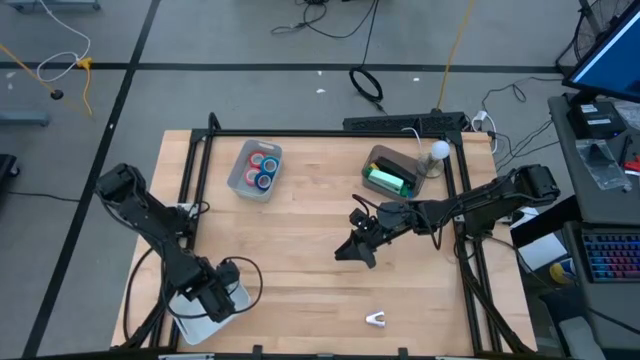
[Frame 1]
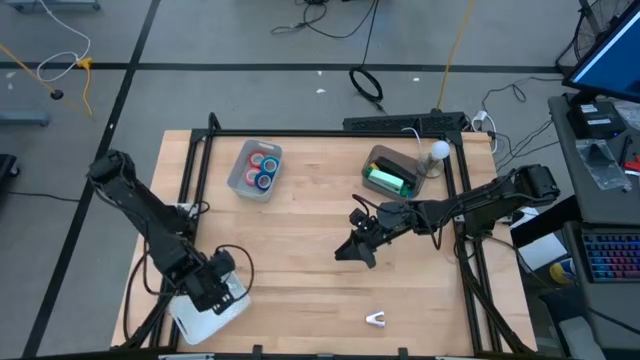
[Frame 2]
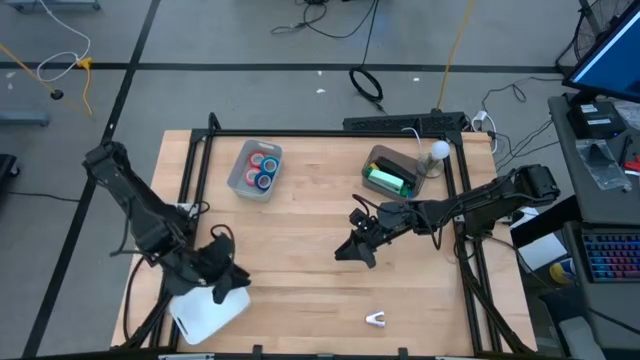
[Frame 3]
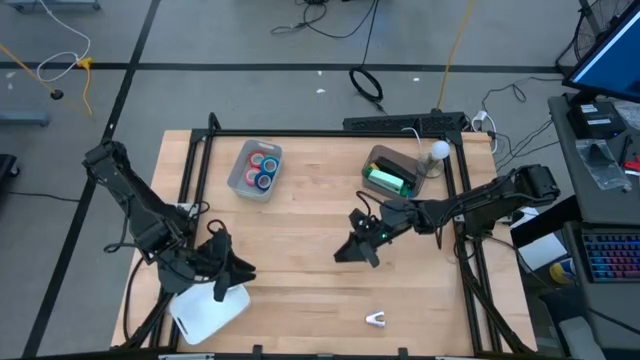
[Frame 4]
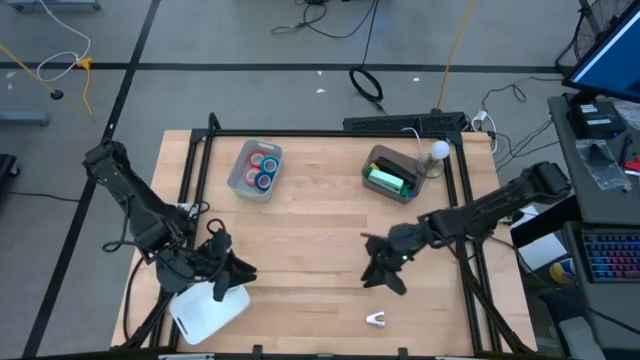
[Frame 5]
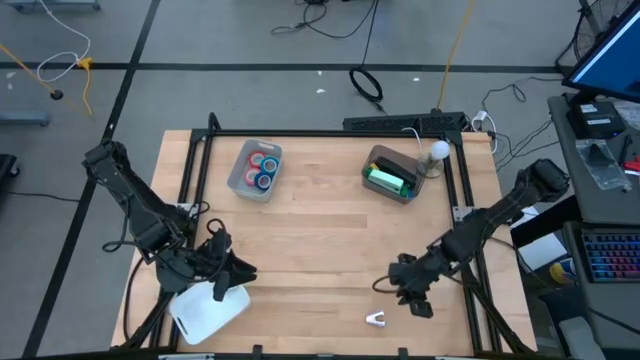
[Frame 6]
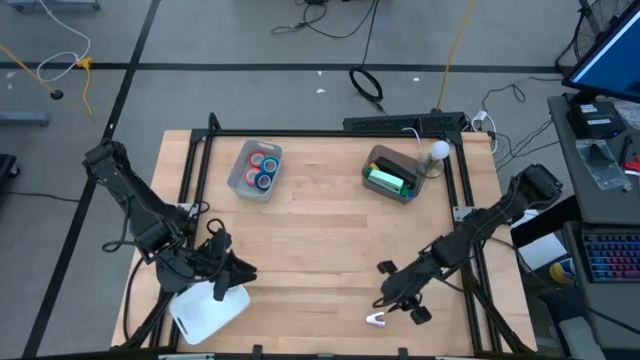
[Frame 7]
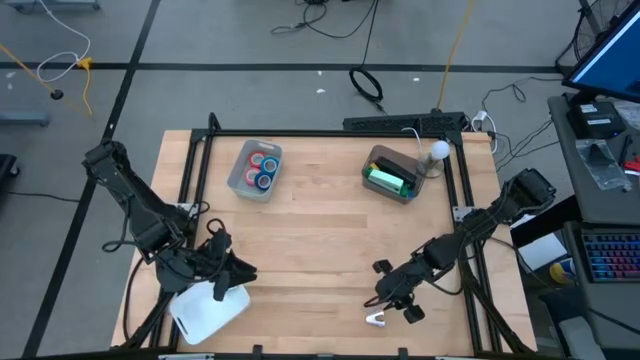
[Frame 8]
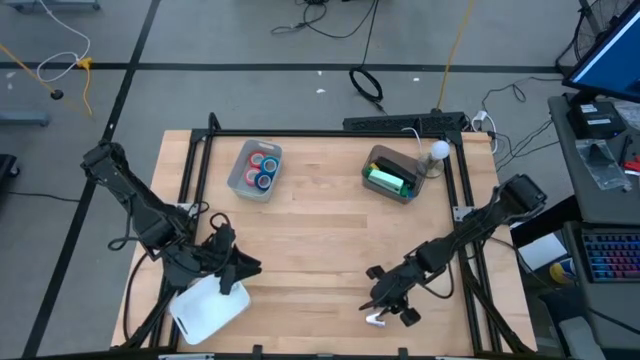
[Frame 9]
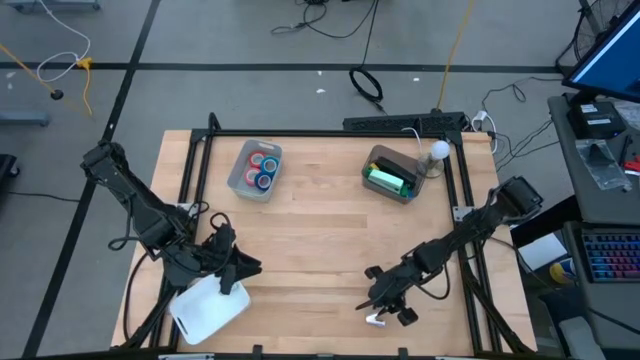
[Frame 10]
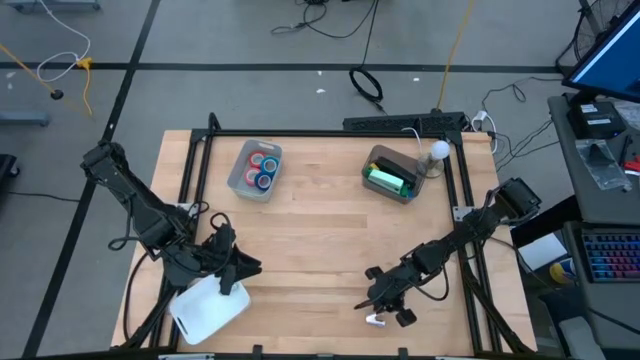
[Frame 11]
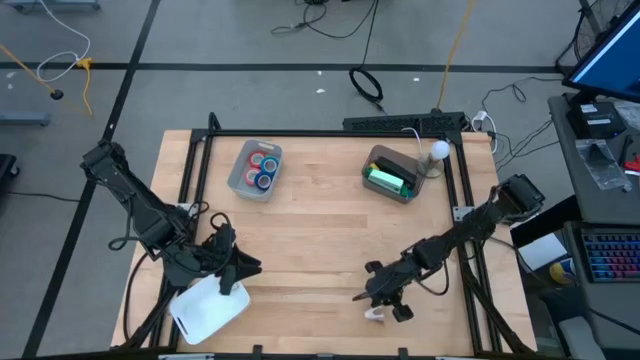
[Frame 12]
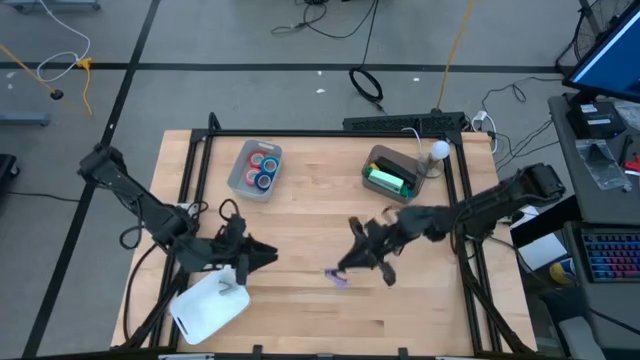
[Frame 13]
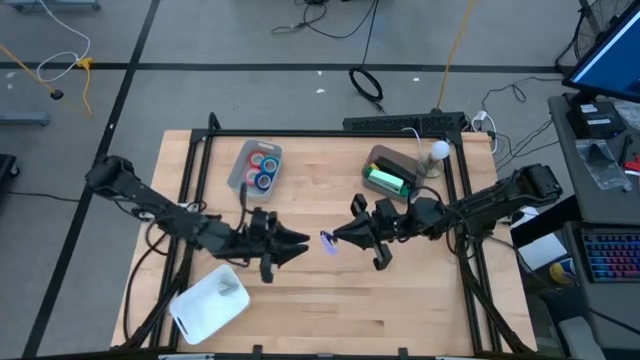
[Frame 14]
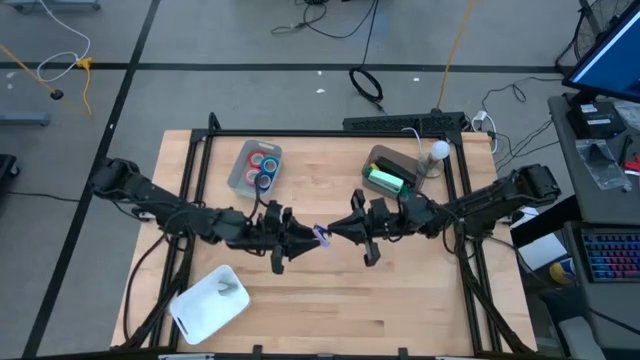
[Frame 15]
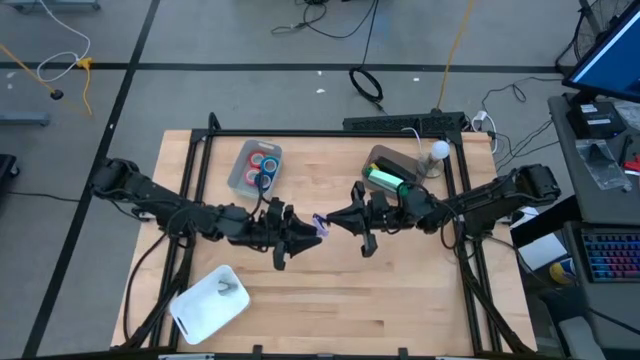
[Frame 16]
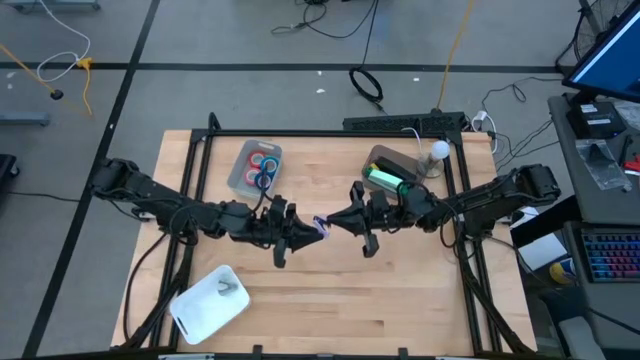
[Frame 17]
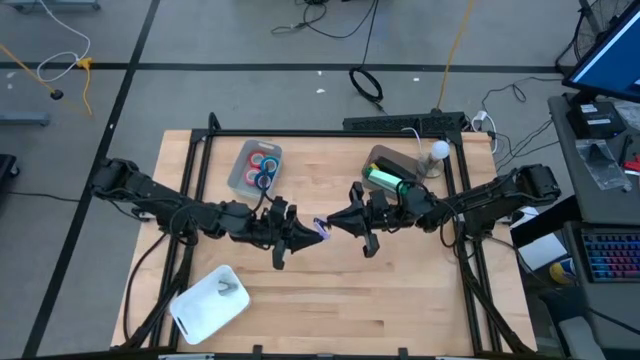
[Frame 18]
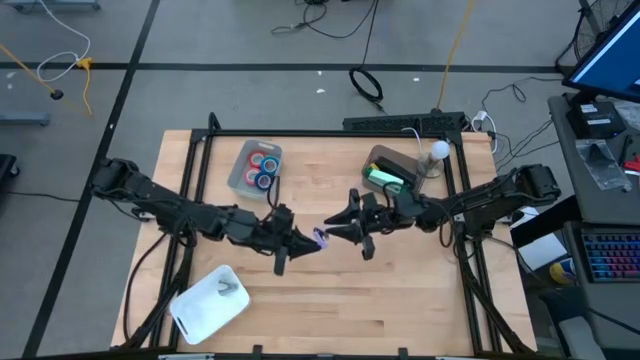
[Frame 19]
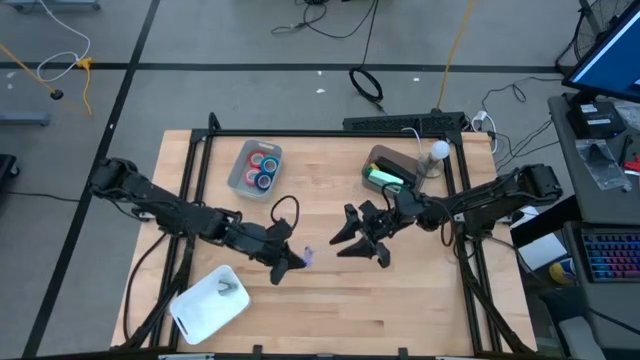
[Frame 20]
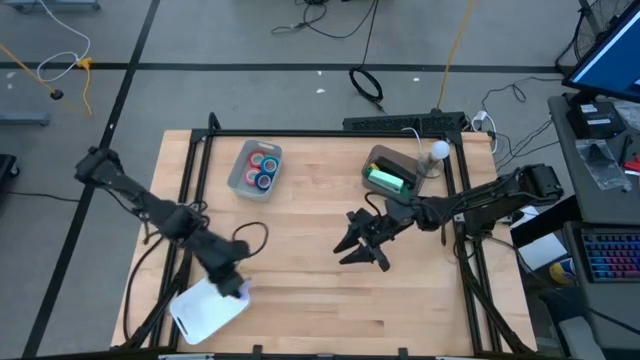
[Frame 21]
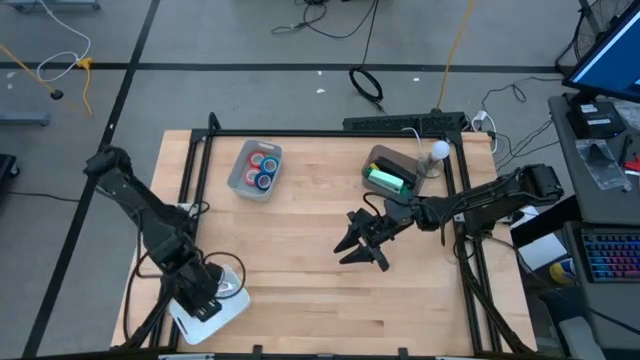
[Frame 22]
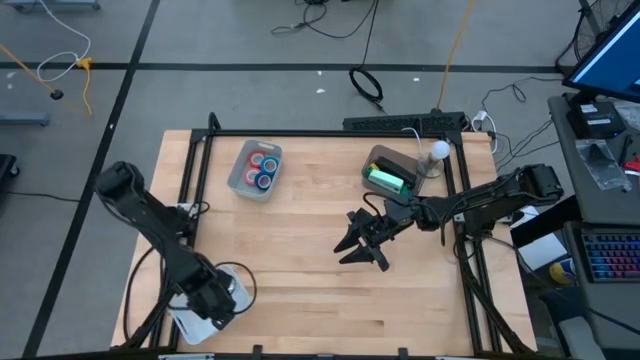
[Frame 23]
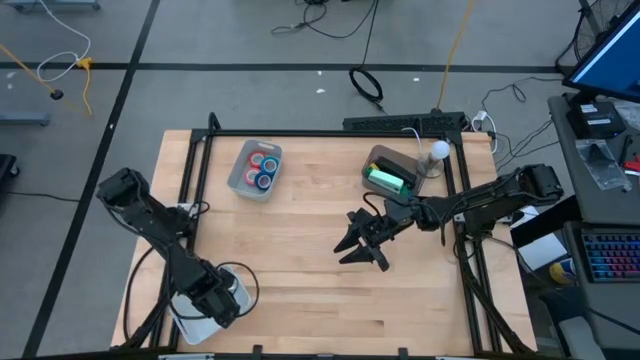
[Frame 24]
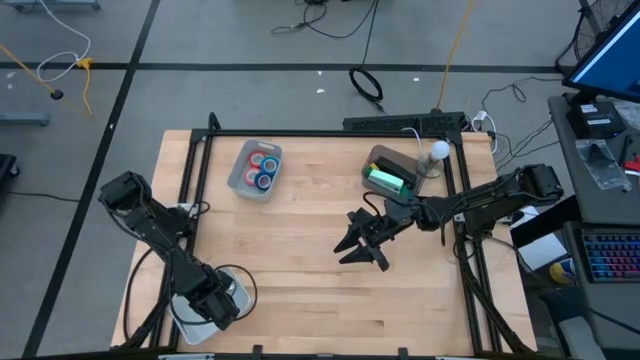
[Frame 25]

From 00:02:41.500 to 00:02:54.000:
Task: Pick and place Stapler, Stapler remover, tape
Put the violet staple remover into the white bin

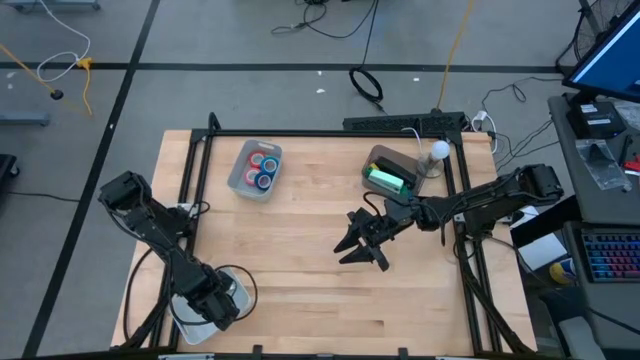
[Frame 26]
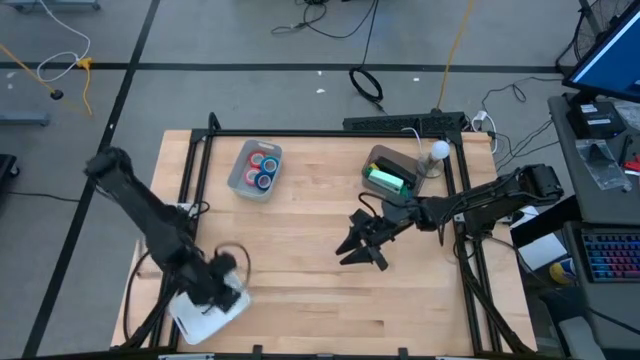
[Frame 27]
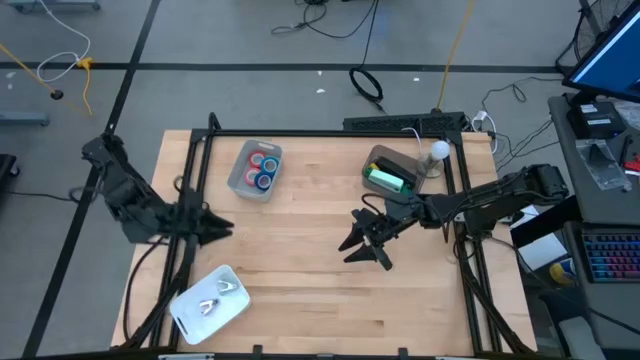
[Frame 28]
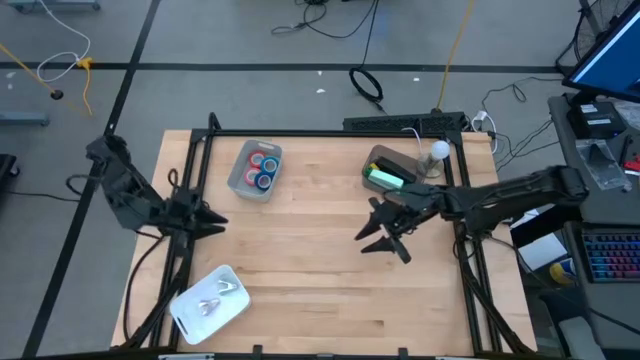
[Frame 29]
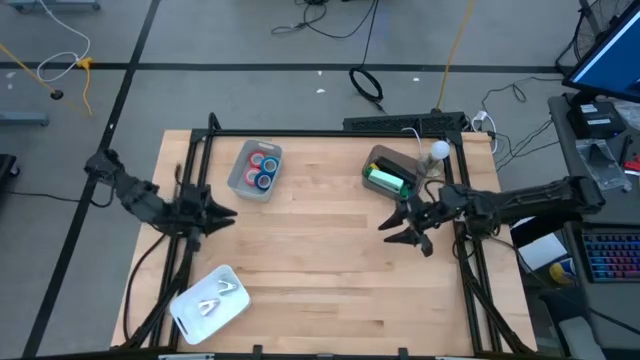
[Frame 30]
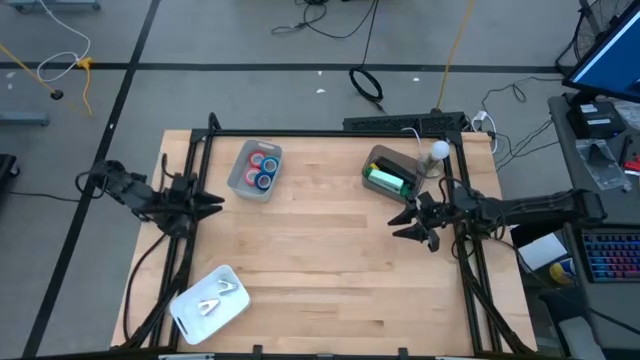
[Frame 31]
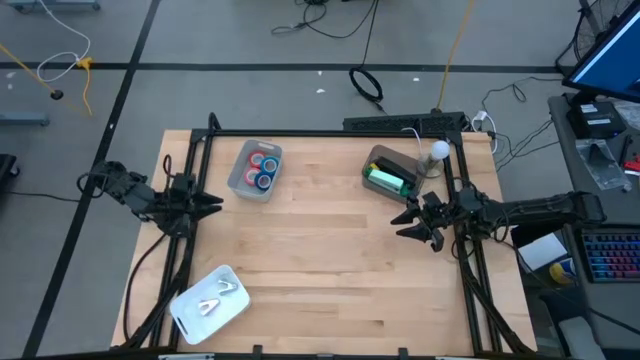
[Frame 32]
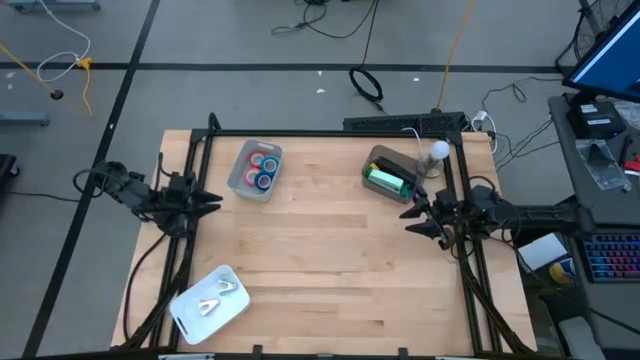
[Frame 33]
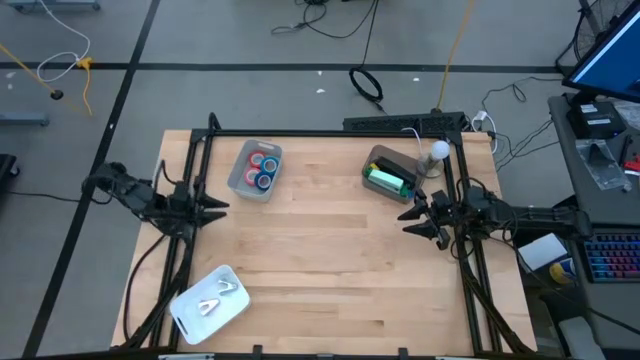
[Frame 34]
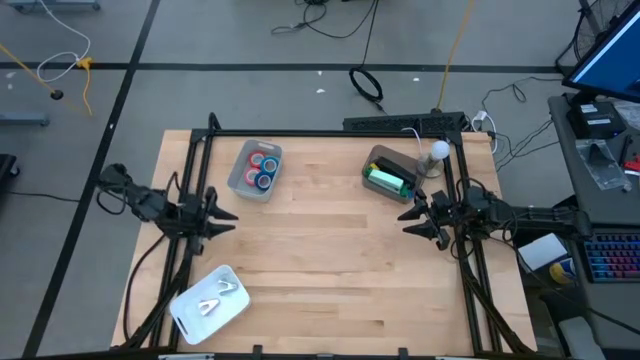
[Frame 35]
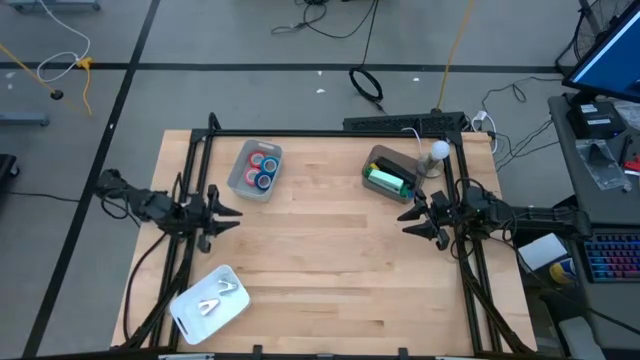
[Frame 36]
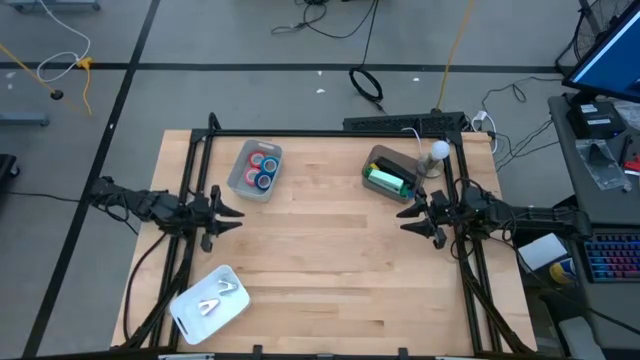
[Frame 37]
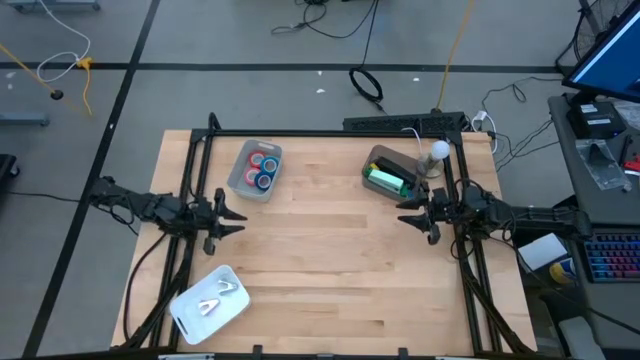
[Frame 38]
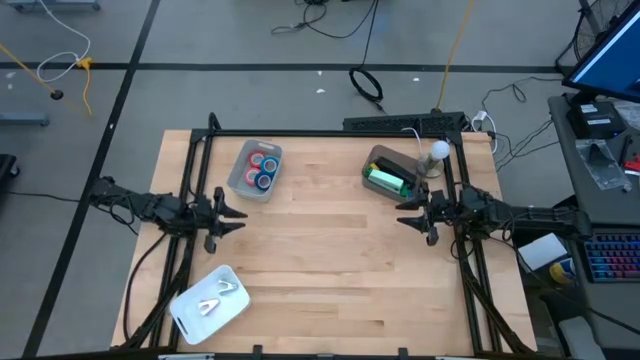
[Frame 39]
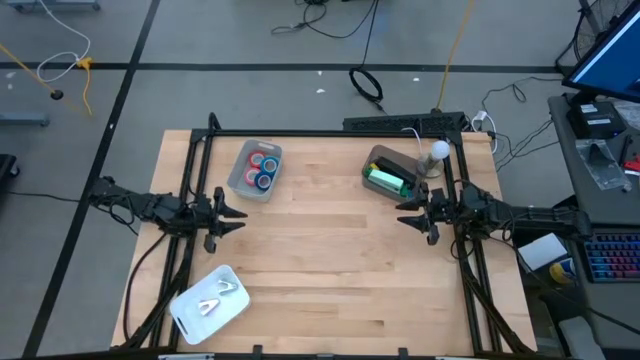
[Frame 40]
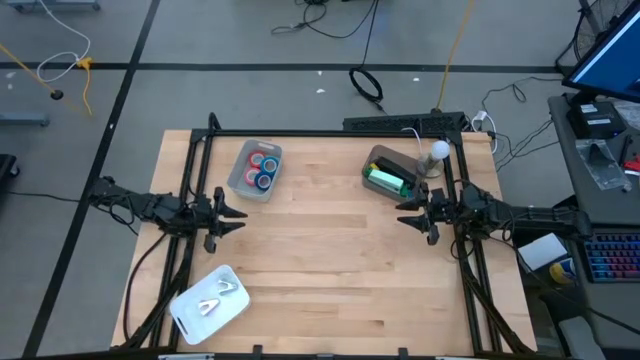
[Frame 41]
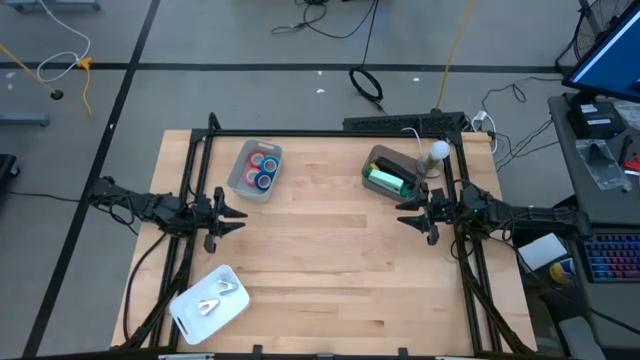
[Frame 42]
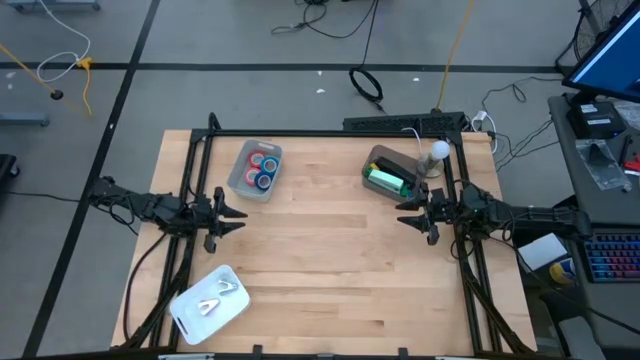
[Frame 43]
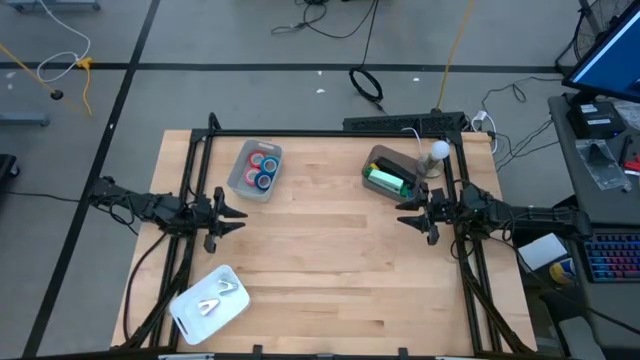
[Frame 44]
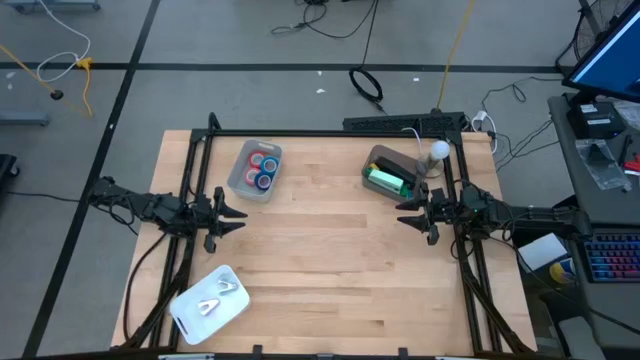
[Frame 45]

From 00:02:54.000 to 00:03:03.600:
Return to Home Position
